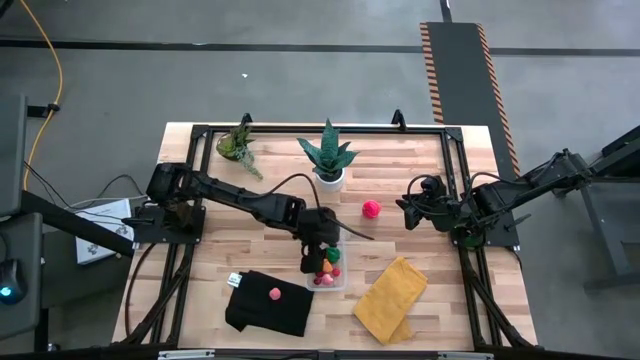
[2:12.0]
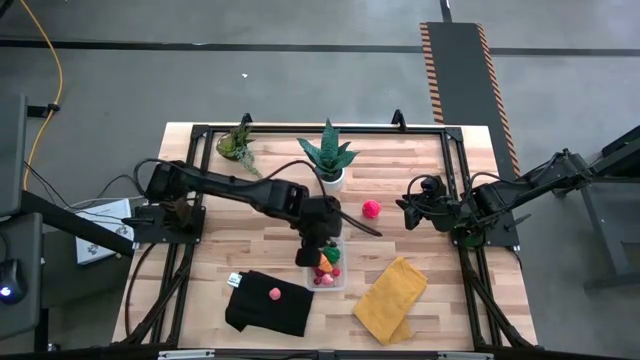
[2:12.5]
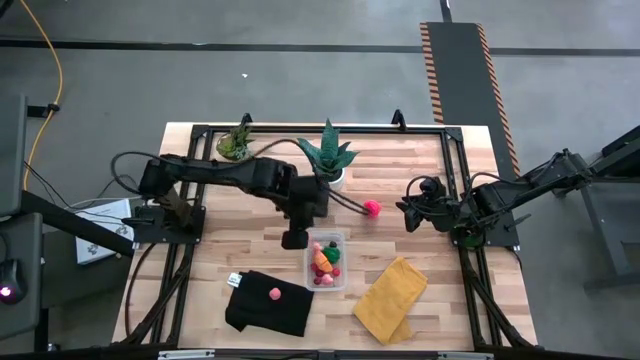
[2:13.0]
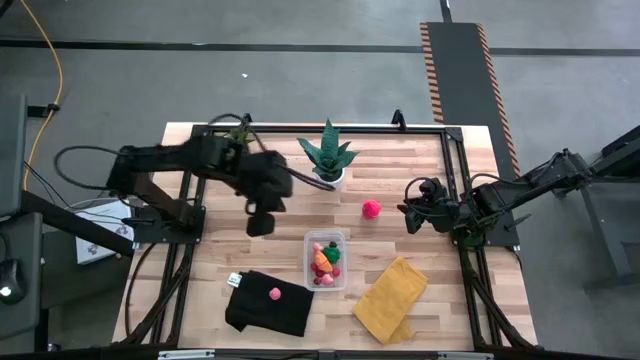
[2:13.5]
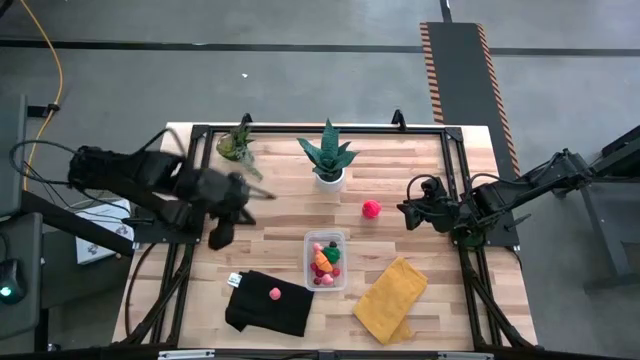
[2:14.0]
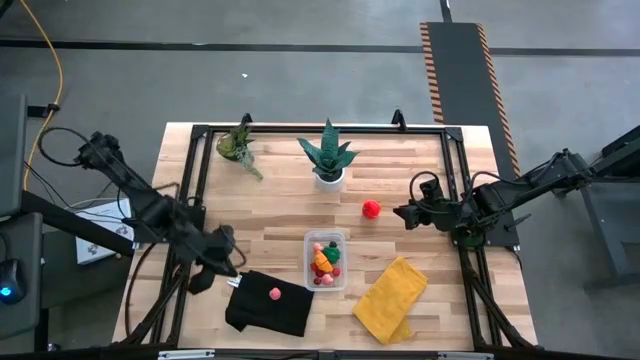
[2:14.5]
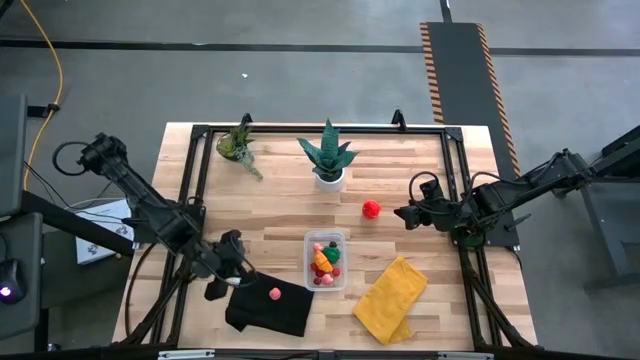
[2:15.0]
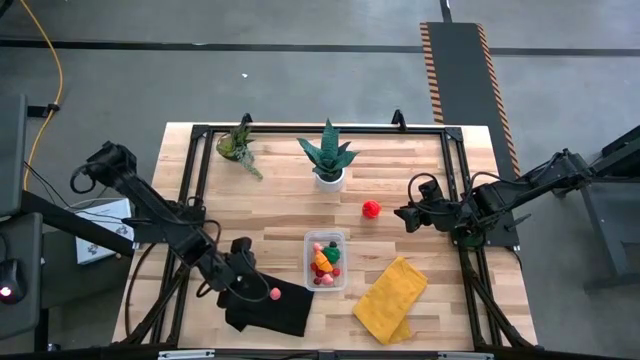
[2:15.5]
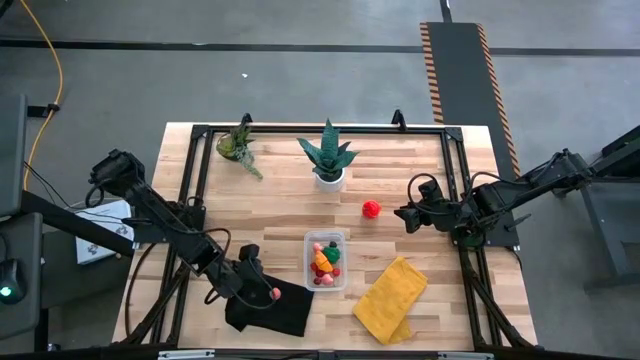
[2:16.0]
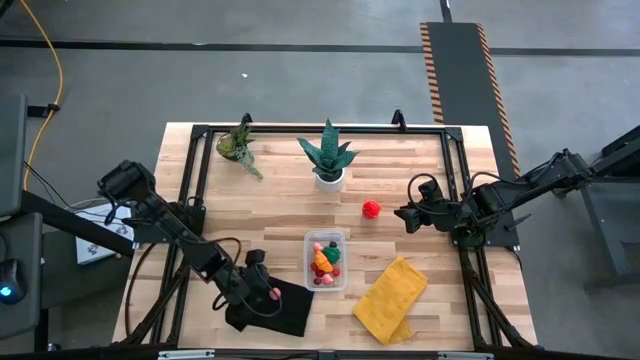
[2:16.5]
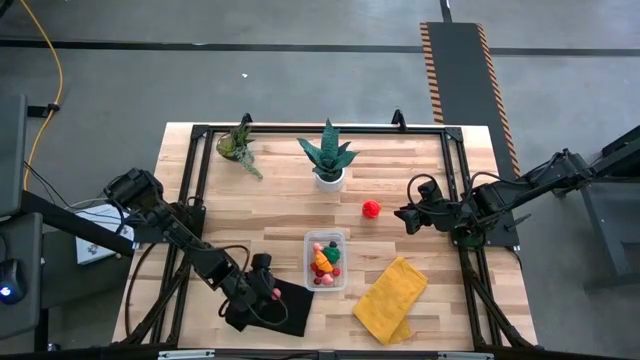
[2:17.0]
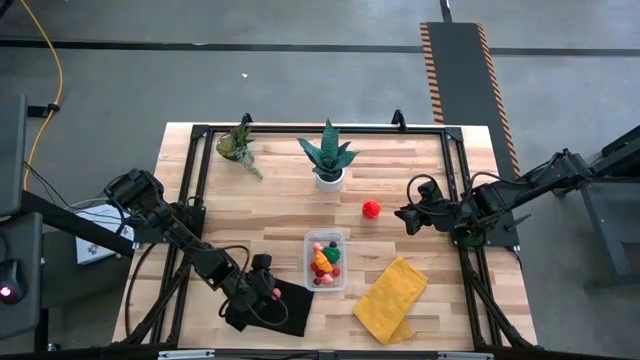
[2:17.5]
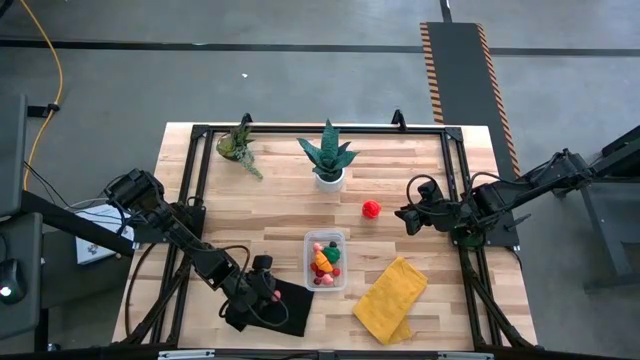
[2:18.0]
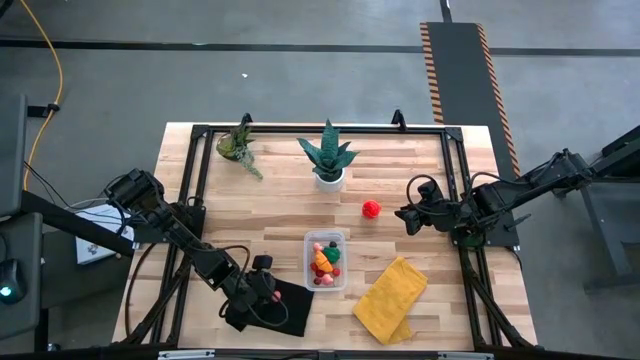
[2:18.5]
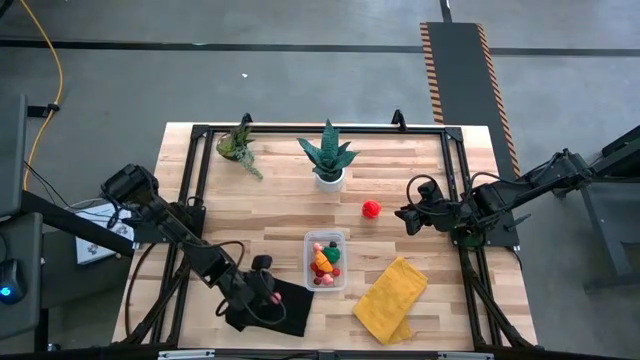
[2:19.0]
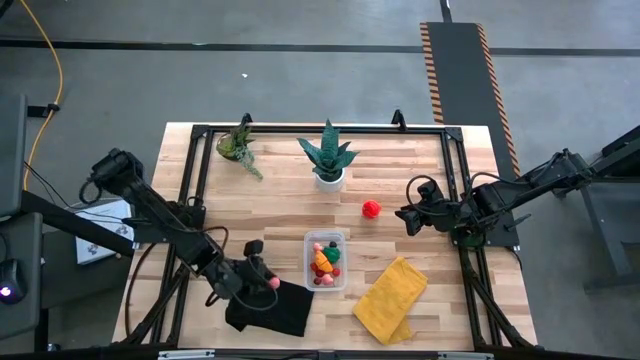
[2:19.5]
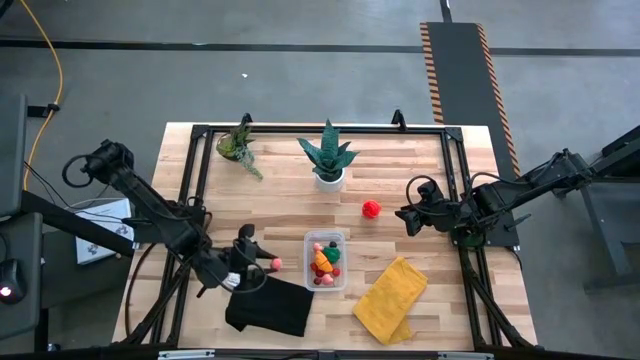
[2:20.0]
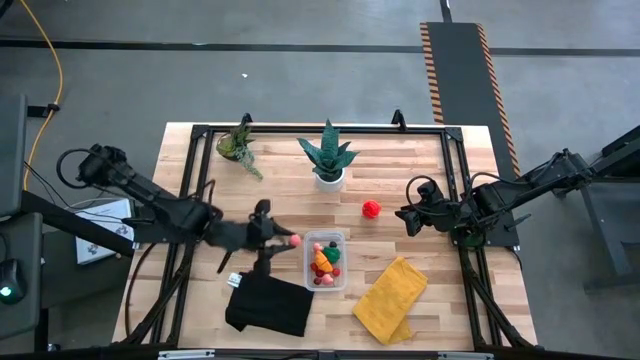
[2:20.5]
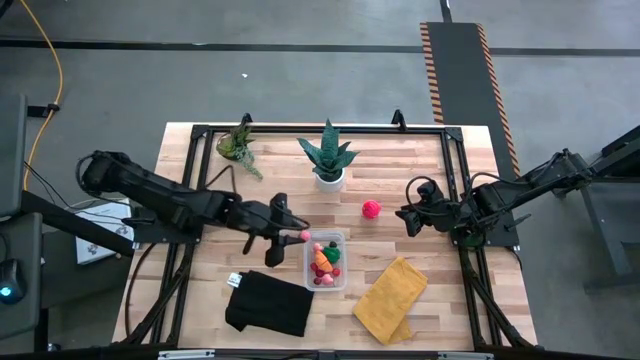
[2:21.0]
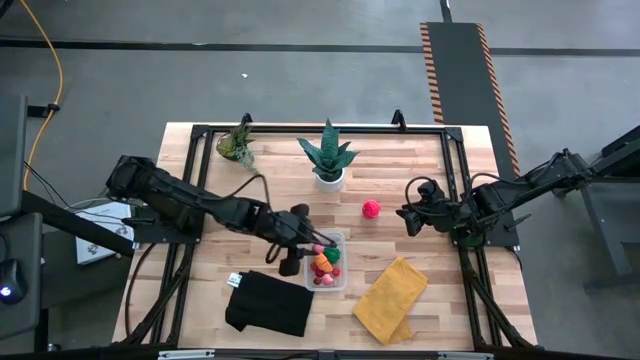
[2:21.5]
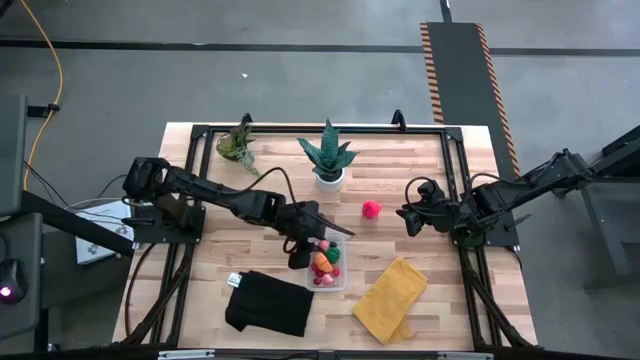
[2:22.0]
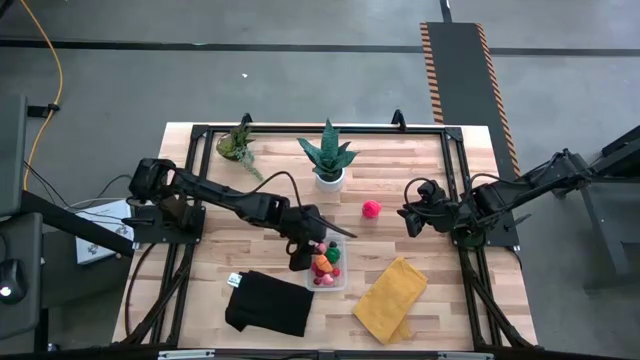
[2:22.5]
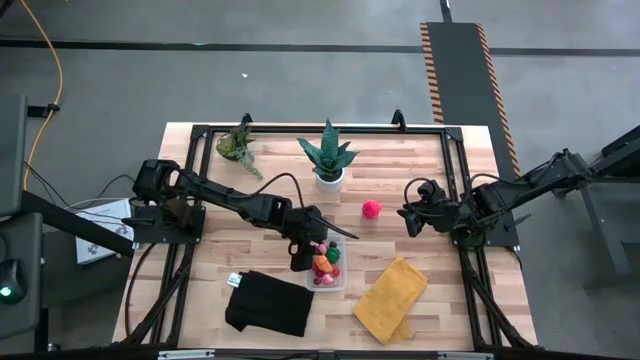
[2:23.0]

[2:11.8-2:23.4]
Task: Pick and placing Produce into tupperware
Put the apricot into the transparent container

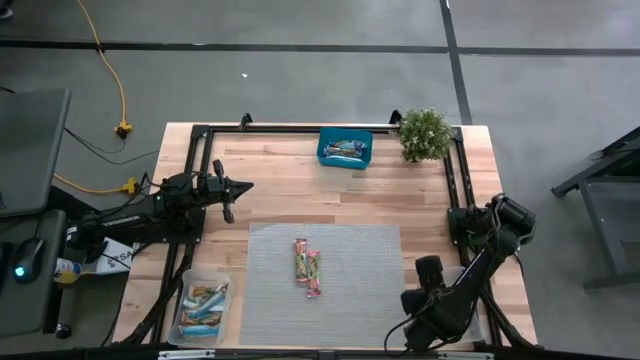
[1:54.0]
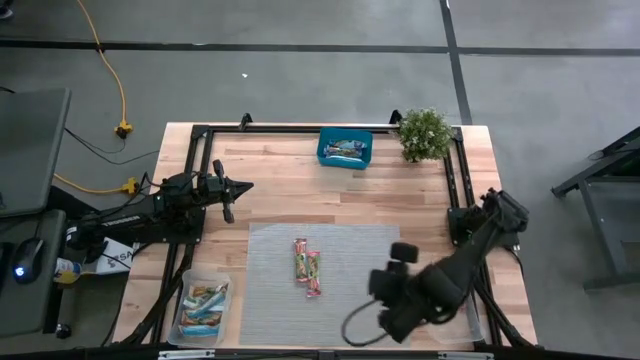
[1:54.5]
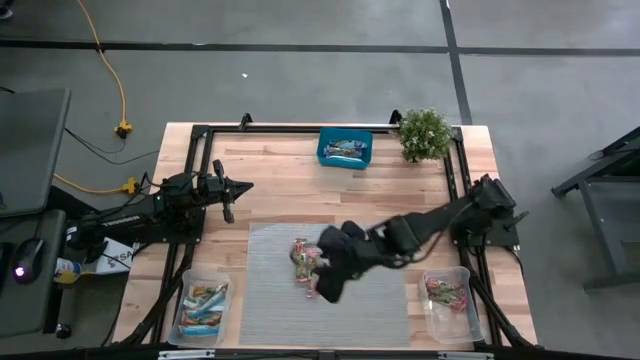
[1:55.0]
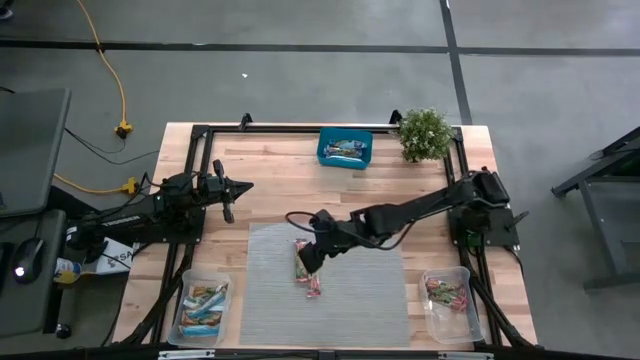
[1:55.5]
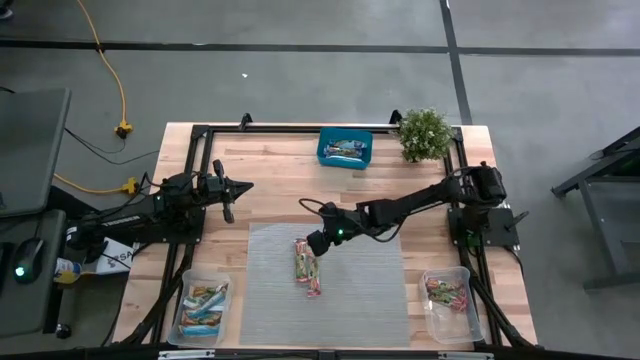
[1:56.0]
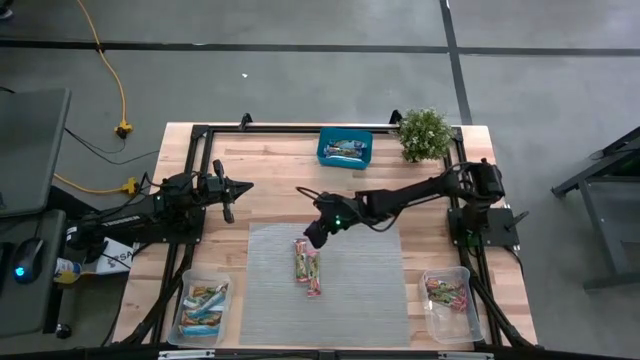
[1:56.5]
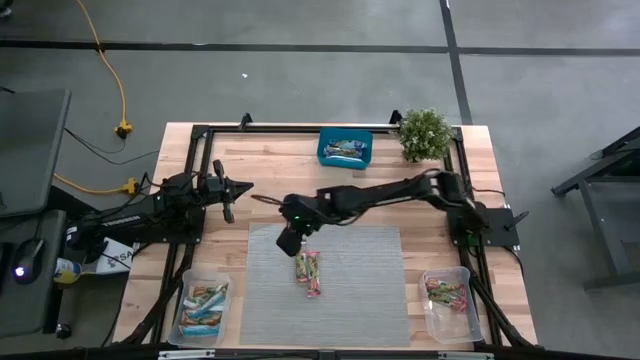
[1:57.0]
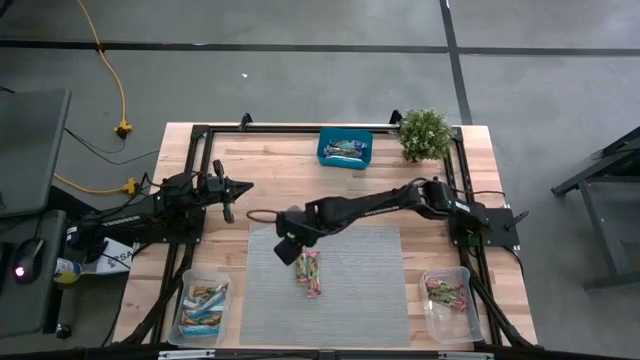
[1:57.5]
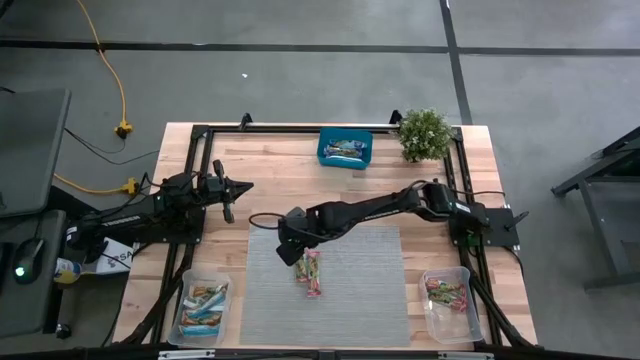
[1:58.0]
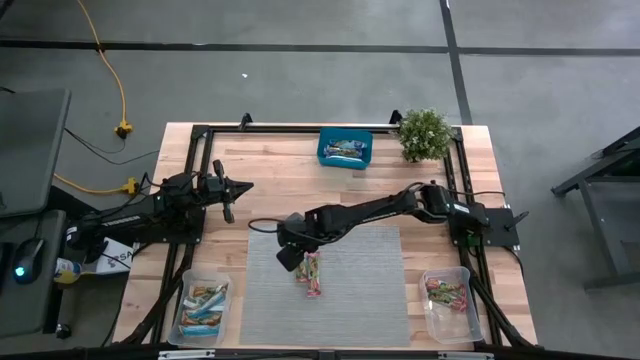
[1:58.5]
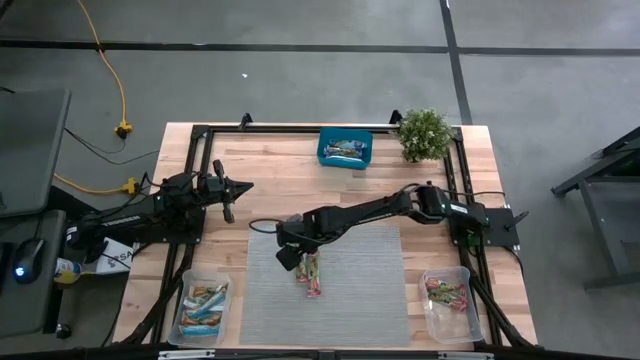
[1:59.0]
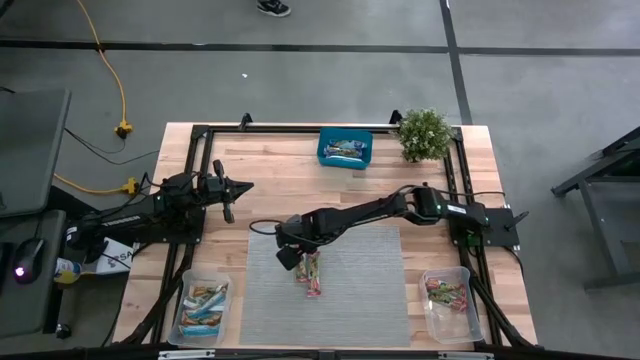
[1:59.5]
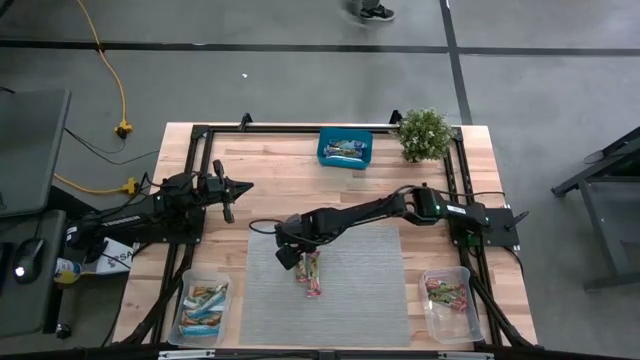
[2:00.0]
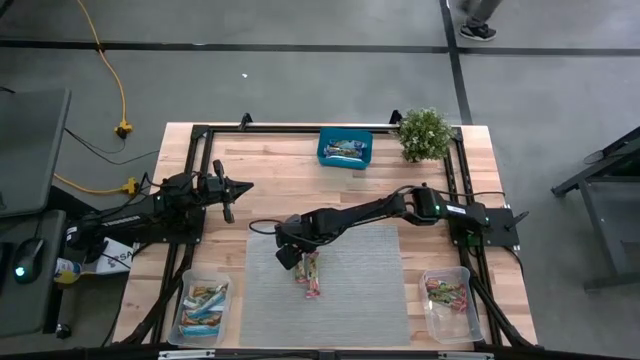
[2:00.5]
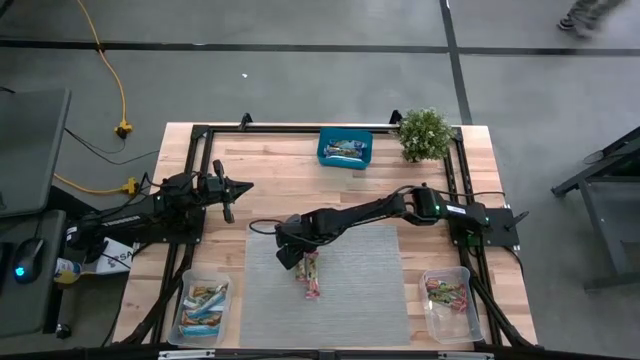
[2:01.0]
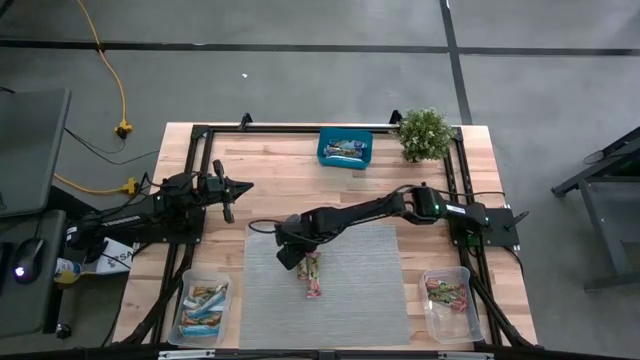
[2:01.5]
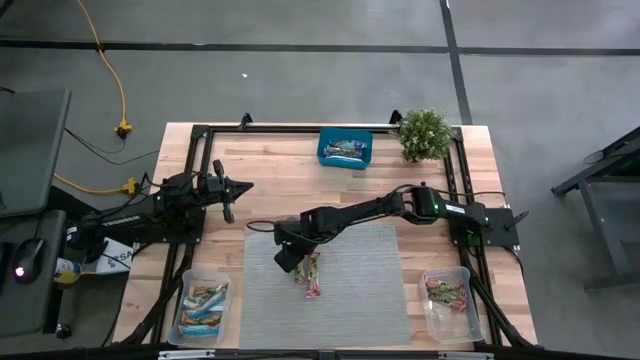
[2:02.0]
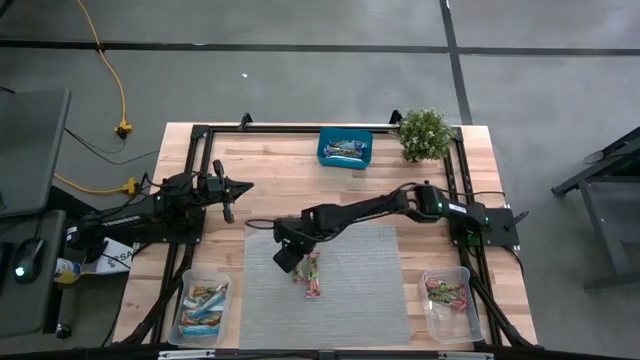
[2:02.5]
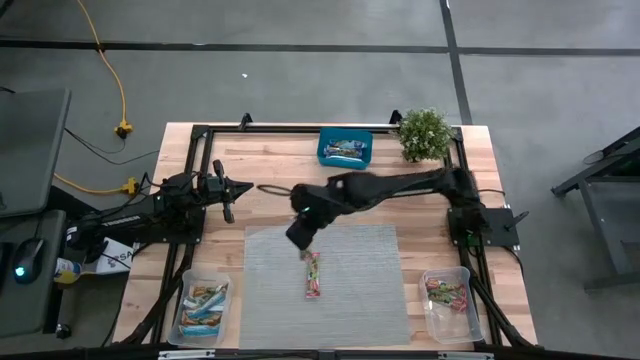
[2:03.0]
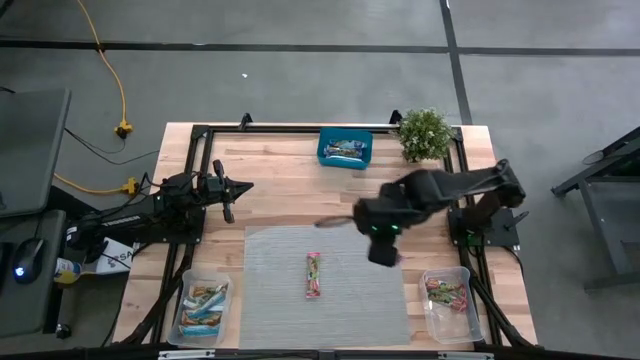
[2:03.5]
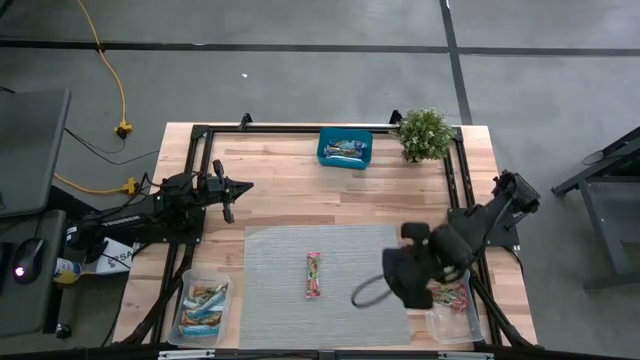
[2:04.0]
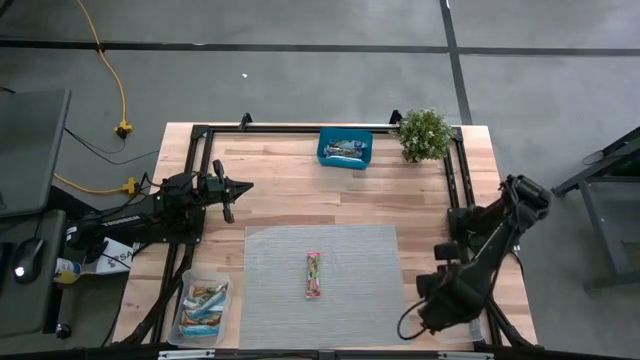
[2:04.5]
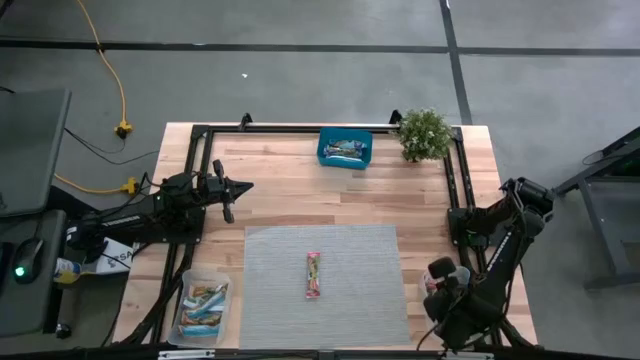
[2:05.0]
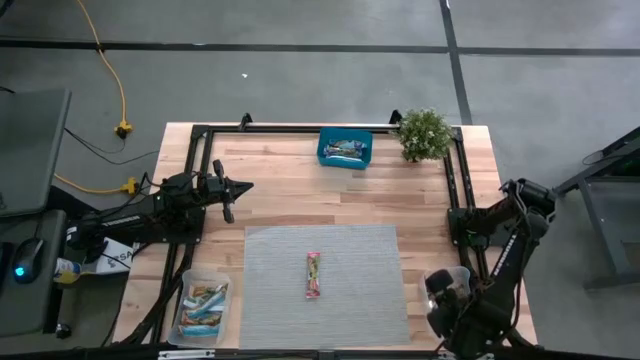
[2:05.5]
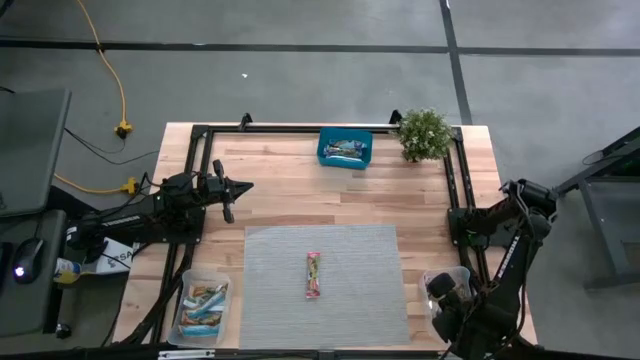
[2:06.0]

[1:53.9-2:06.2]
Task: Pick and place Granola Bars by type
Put the red granola bar into the right transparent bin
